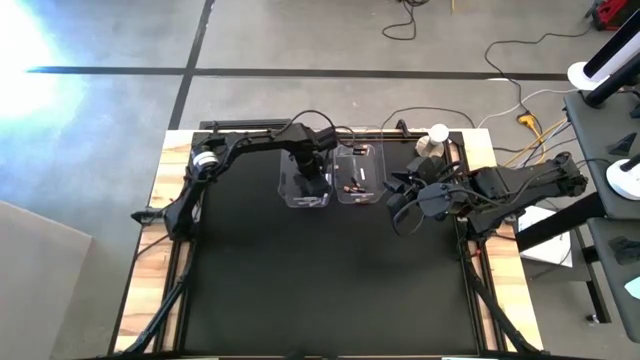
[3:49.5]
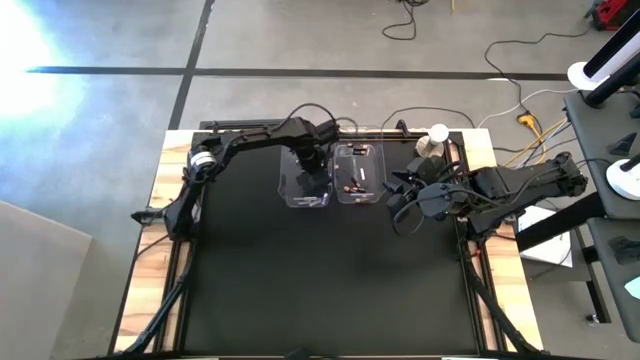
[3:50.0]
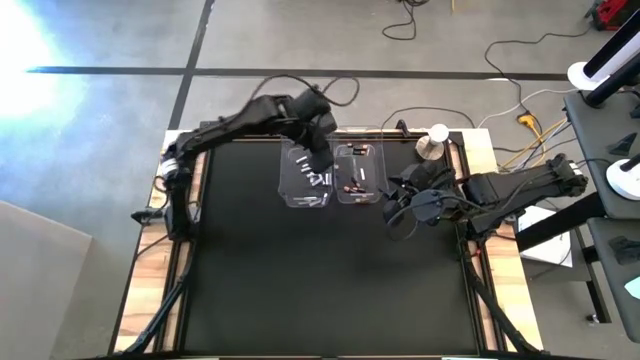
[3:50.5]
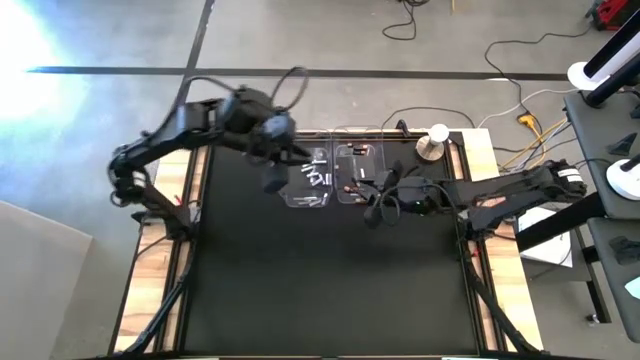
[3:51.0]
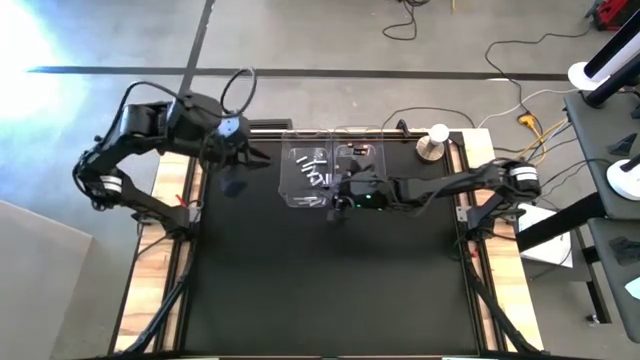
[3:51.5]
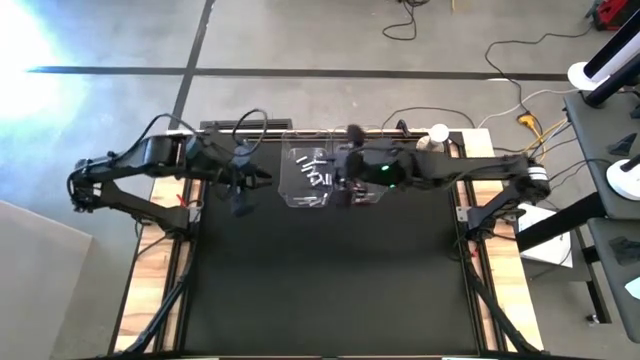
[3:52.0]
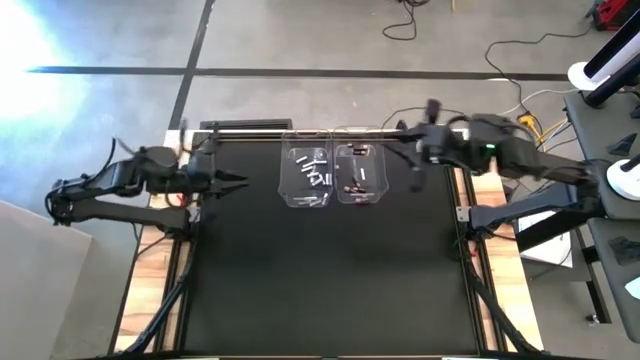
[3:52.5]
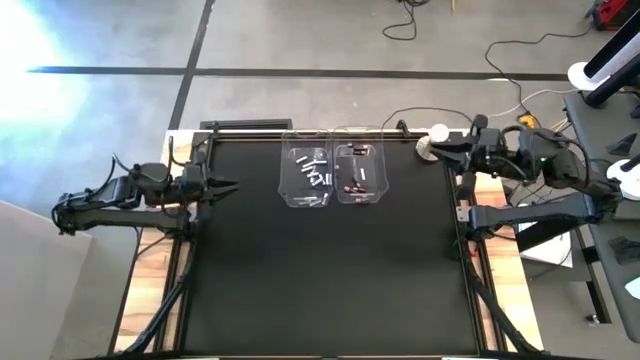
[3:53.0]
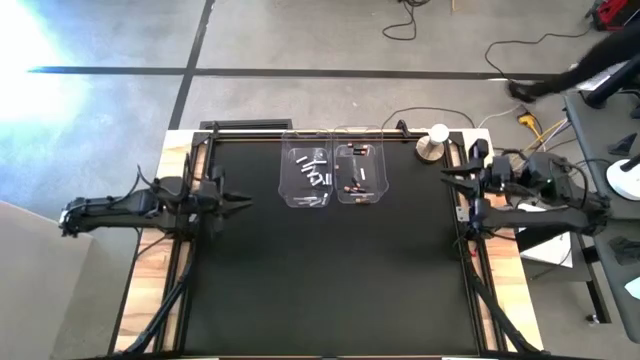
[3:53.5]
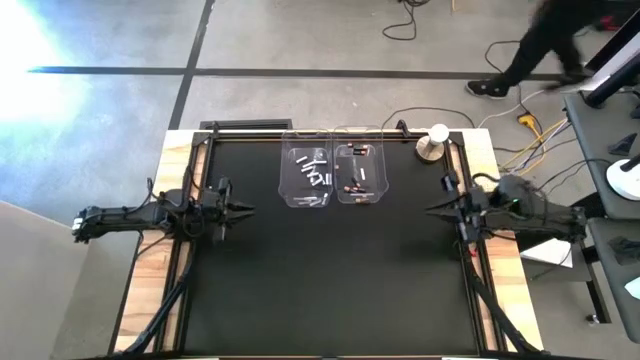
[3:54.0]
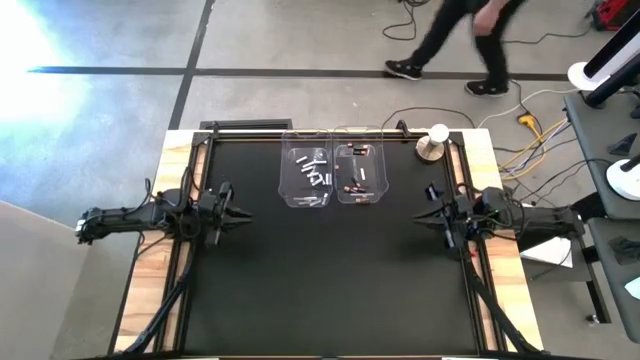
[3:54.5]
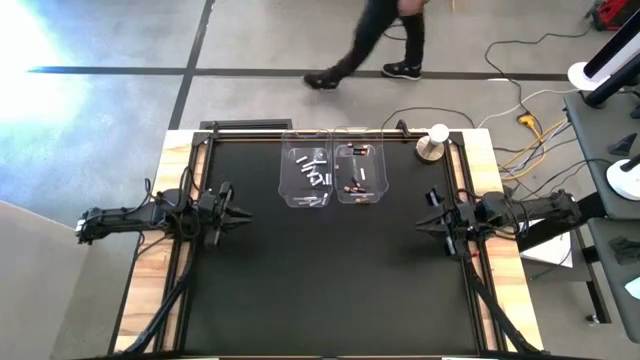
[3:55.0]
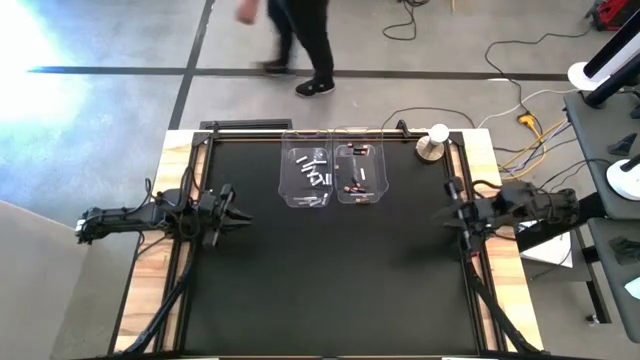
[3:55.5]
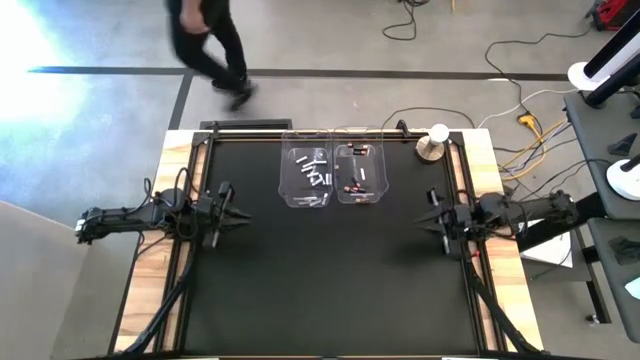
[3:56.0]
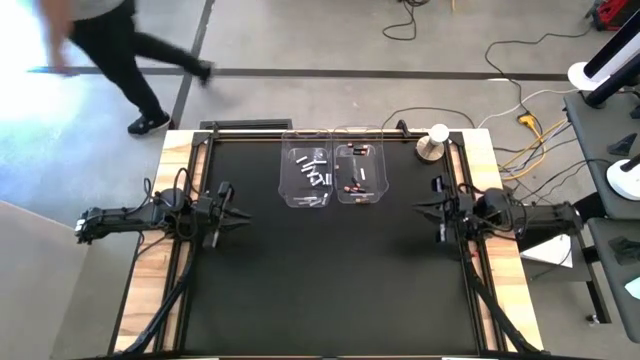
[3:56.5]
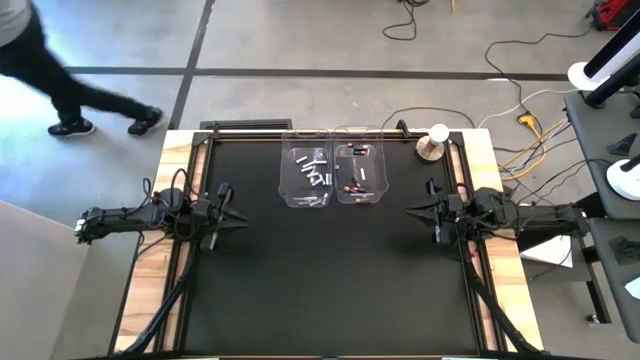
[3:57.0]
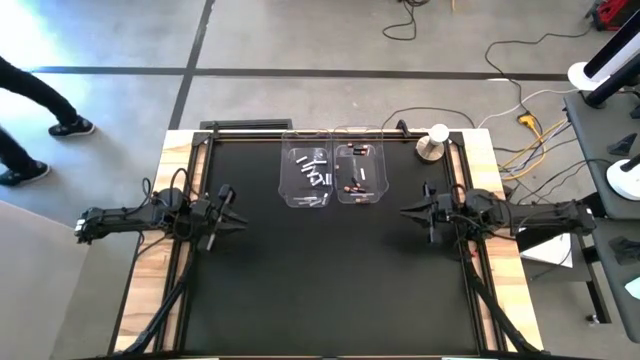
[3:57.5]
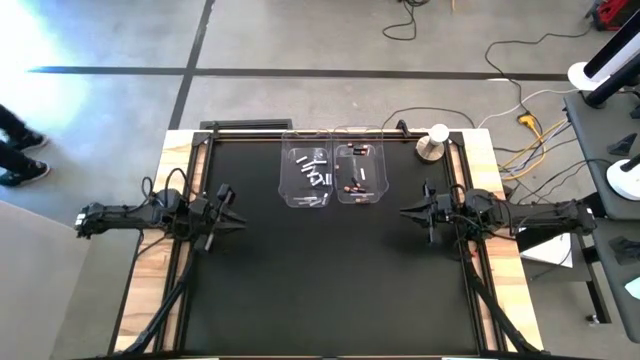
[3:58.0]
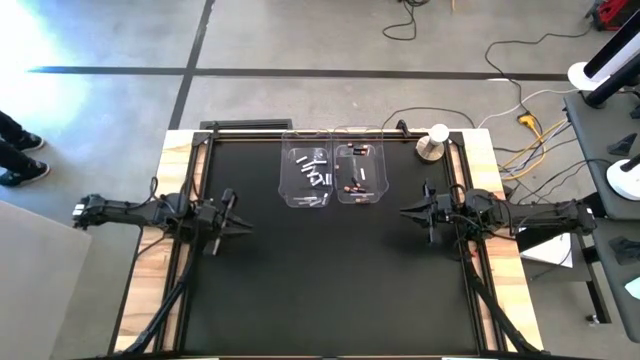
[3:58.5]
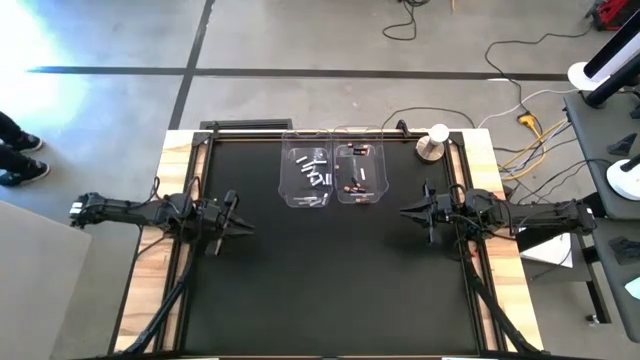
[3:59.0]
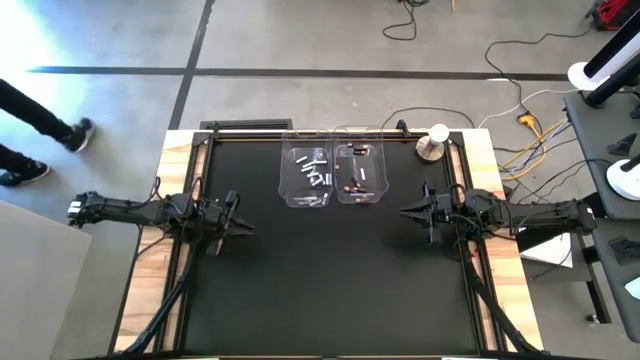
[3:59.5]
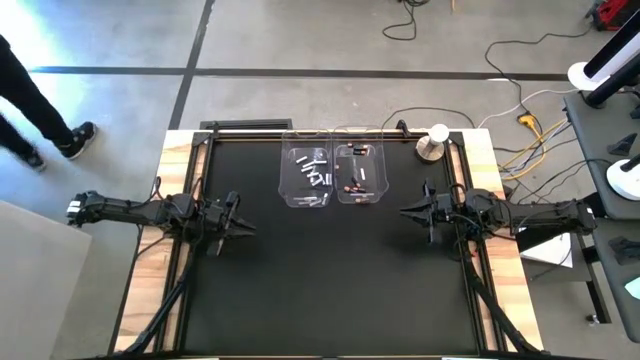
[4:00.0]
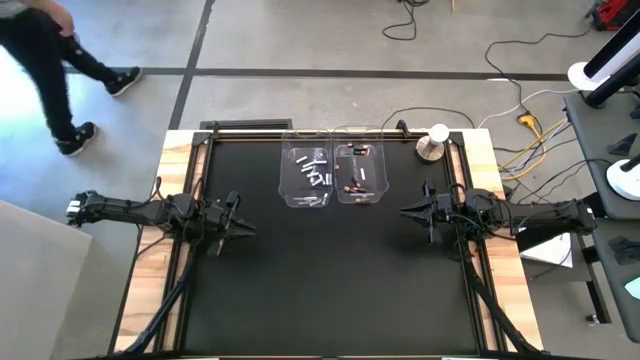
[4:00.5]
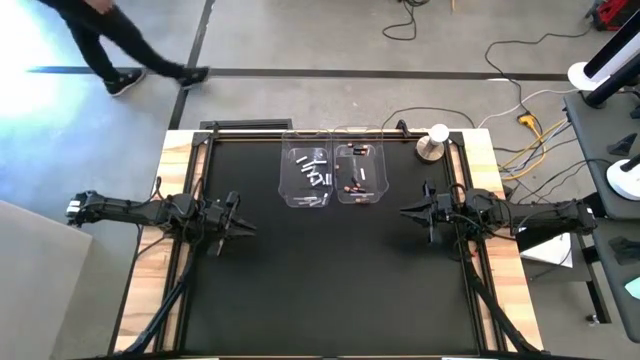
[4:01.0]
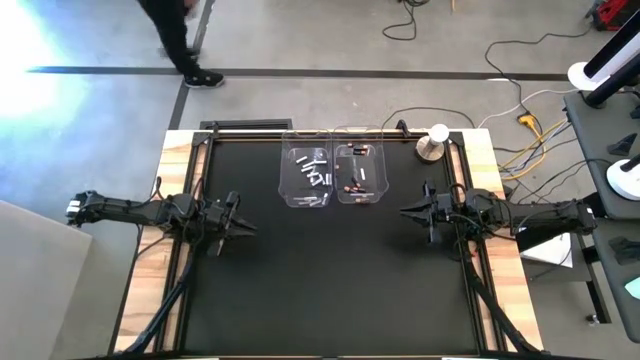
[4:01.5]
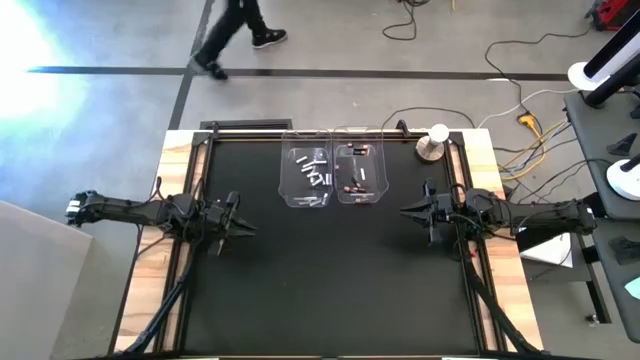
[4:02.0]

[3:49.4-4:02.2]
Task: Sort batteries
Return to Home Position

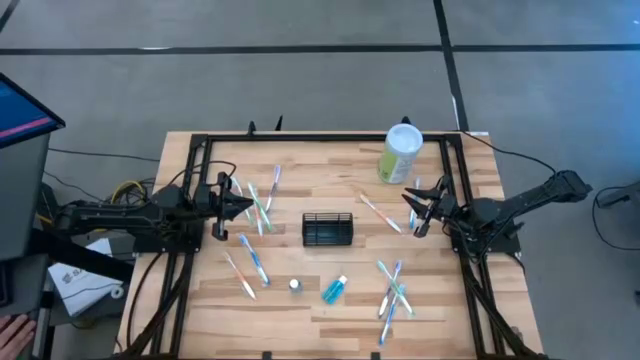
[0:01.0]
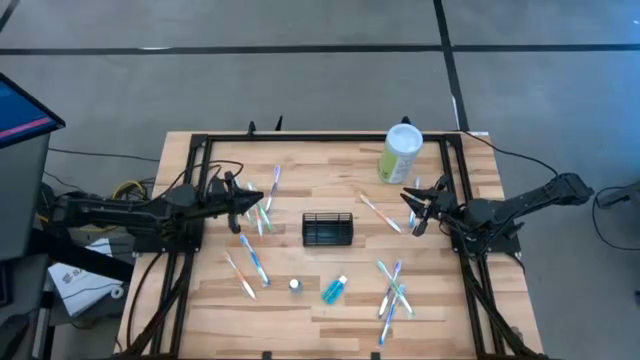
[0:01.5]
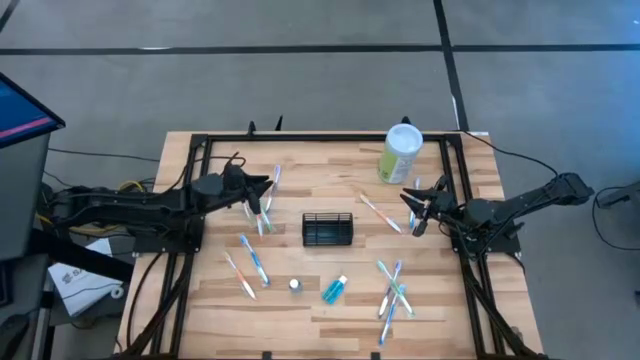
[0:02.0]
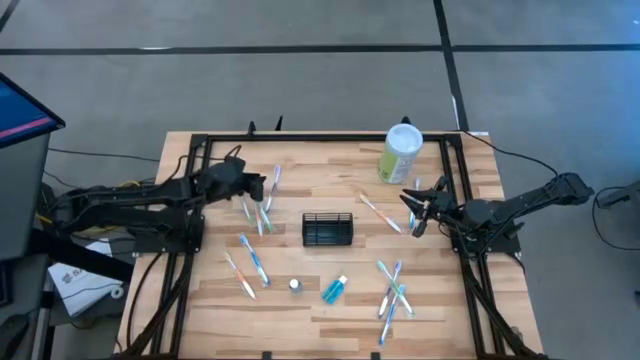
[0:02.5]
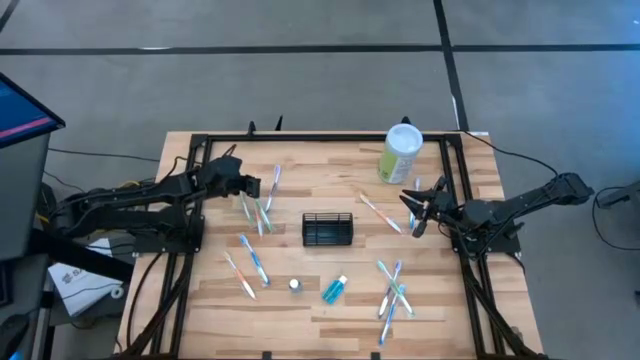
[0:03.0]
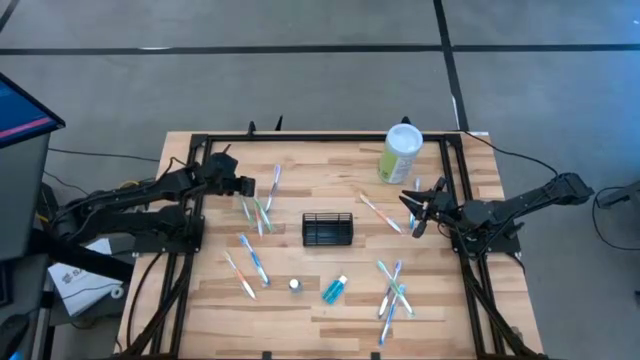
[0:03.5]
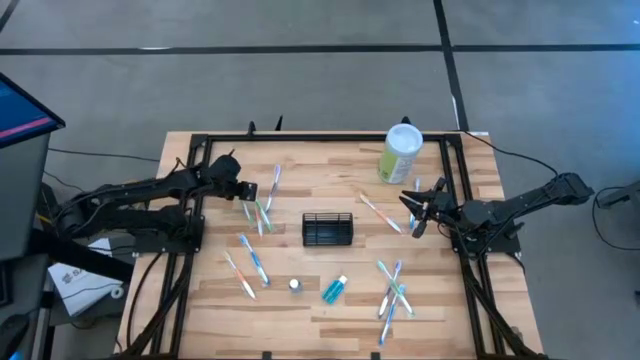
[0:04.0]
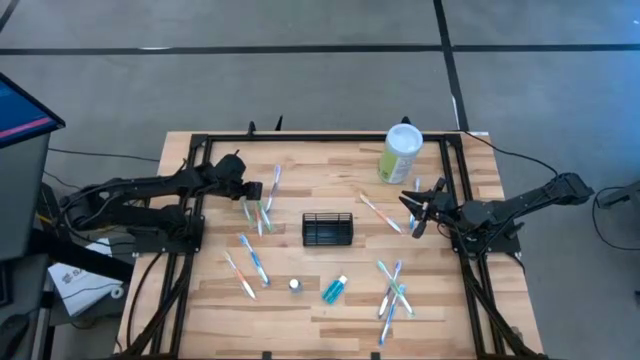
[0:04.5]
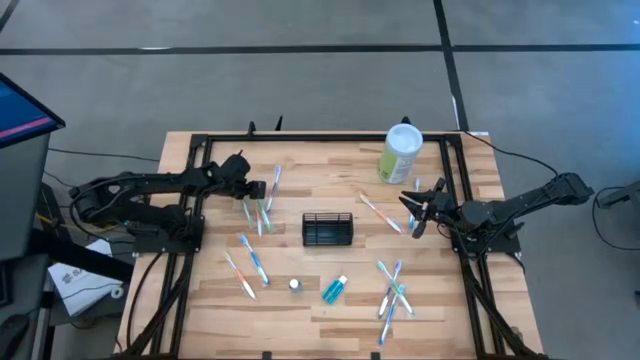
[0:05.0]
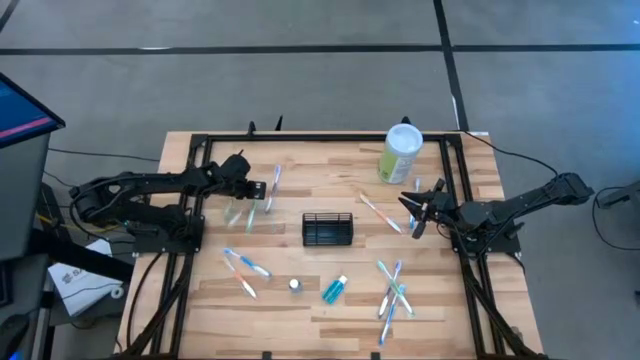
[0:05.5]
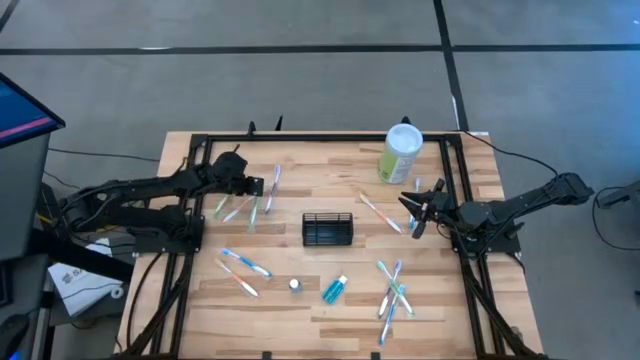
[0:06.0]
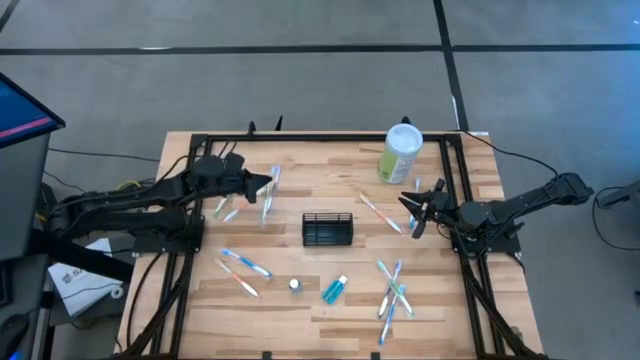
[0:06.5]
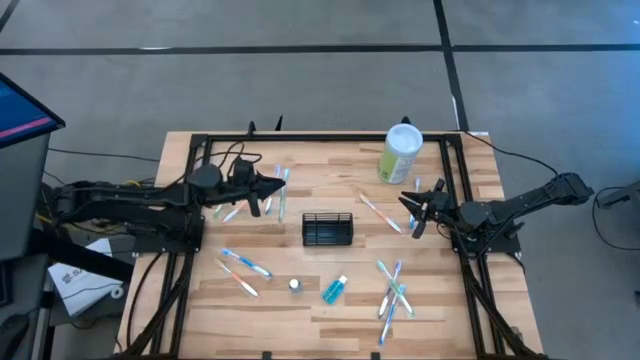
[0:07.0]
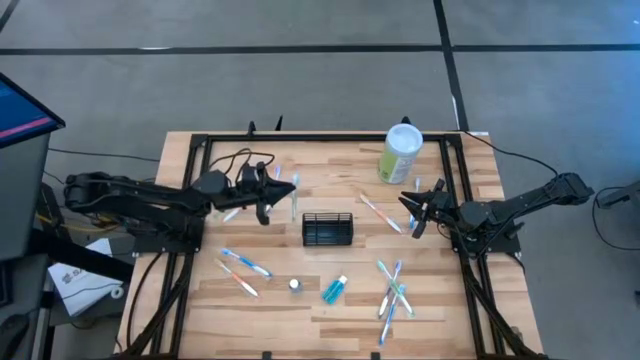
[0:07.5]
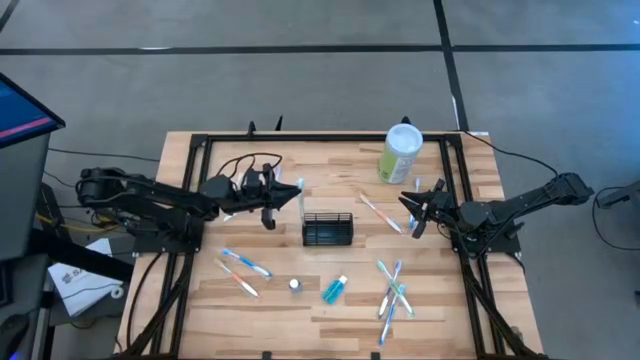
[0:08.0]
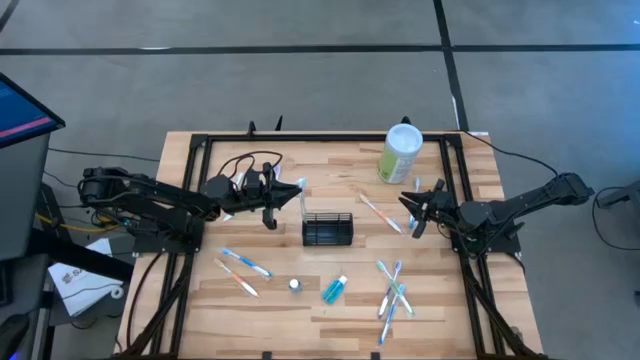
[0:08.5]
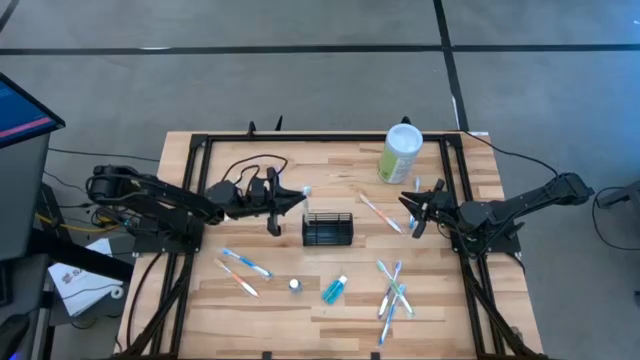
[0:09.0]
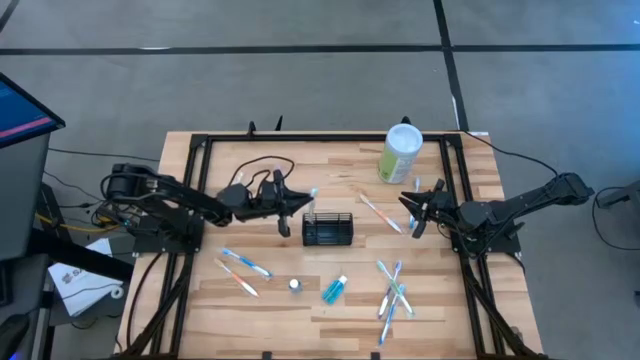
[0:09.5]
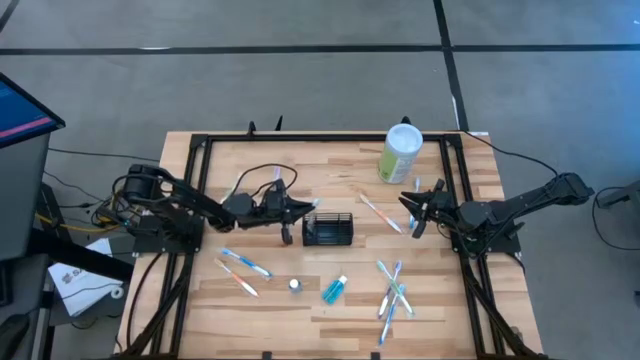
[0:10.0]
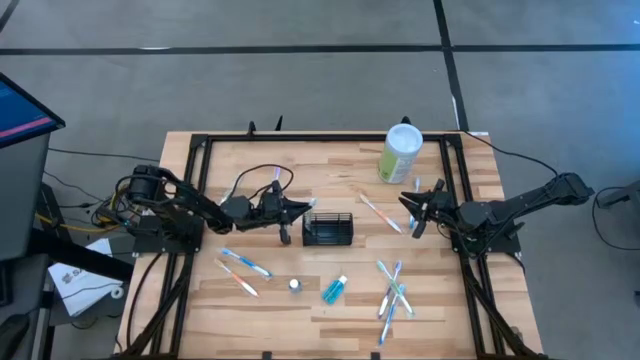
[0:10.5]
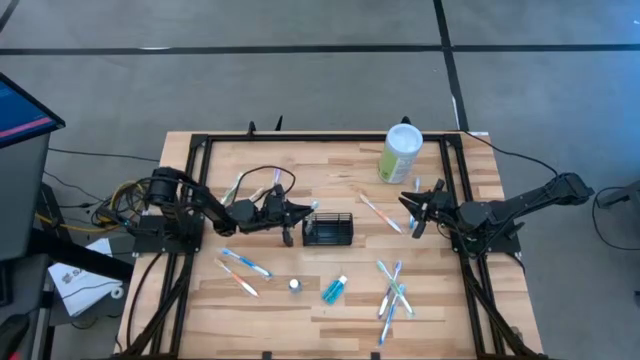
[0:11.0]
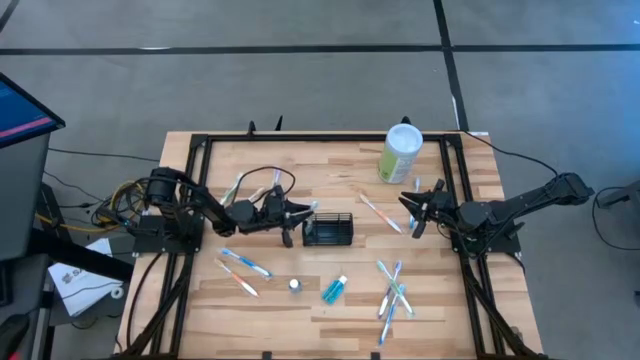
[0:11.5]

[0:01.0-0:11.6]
Task: Pick & Place toothbrushing station
Put the middle green toothbrush into the left compartment of the organizer
